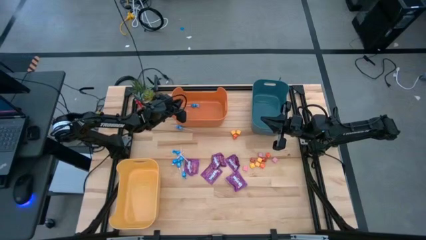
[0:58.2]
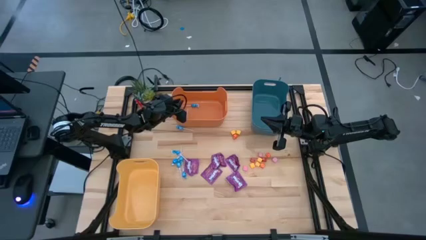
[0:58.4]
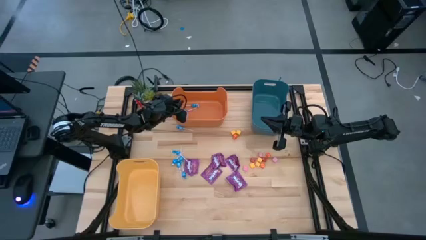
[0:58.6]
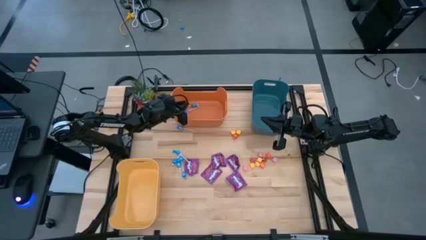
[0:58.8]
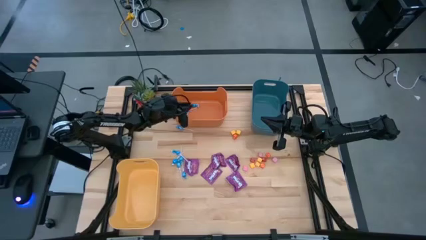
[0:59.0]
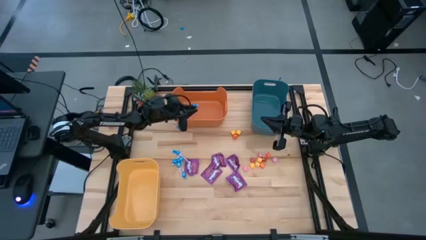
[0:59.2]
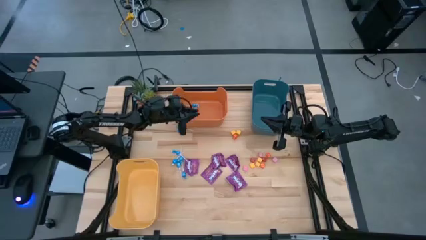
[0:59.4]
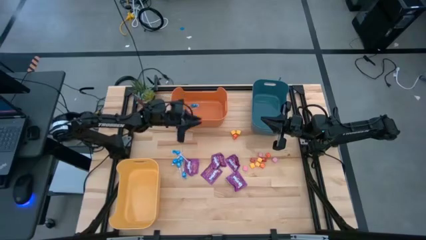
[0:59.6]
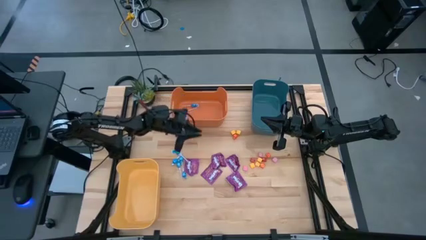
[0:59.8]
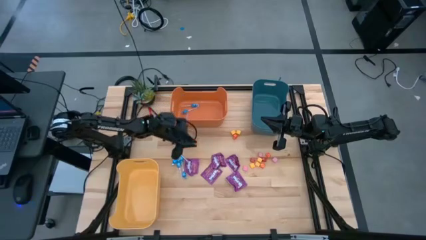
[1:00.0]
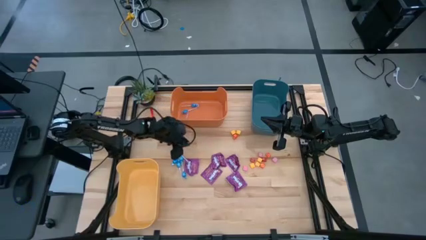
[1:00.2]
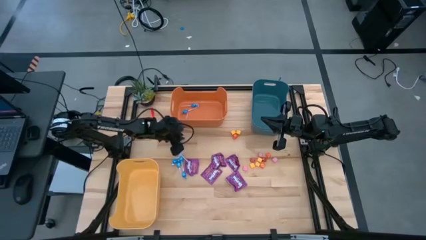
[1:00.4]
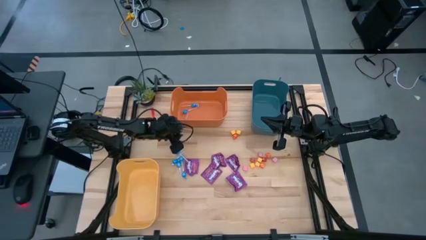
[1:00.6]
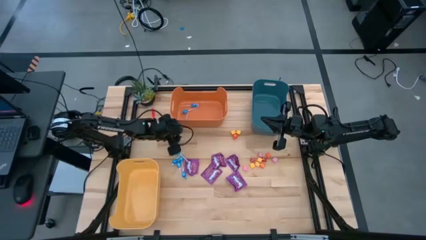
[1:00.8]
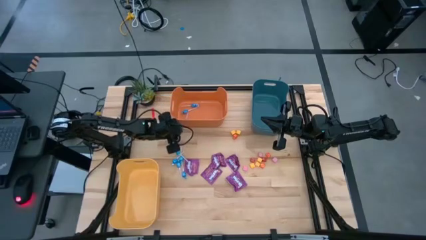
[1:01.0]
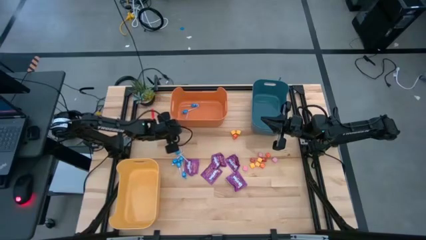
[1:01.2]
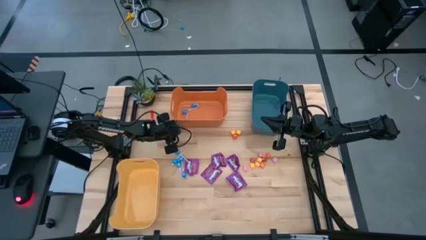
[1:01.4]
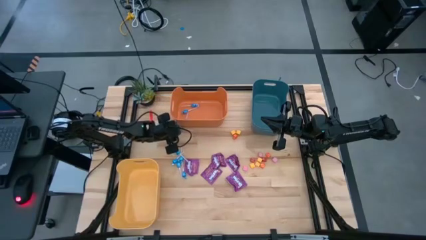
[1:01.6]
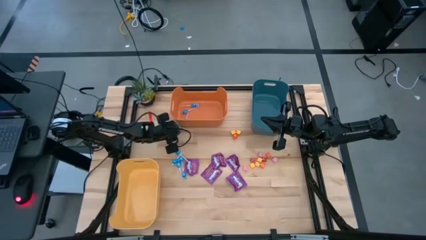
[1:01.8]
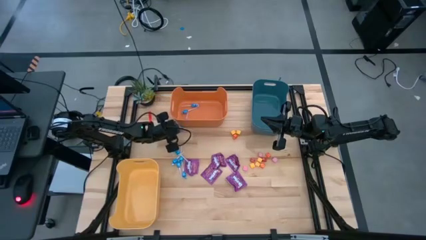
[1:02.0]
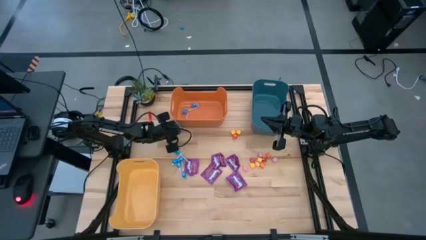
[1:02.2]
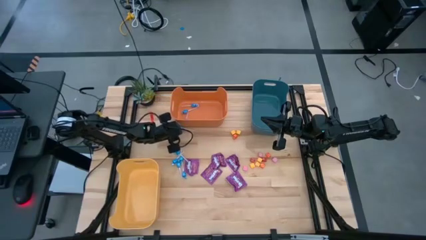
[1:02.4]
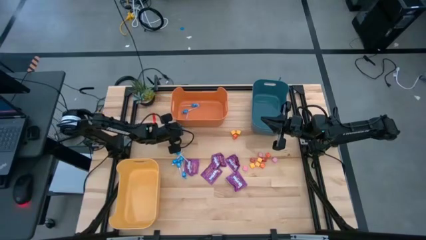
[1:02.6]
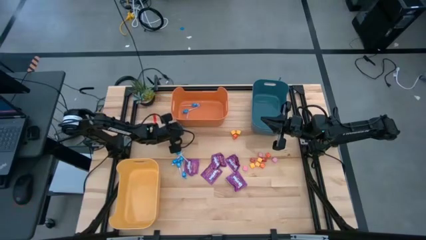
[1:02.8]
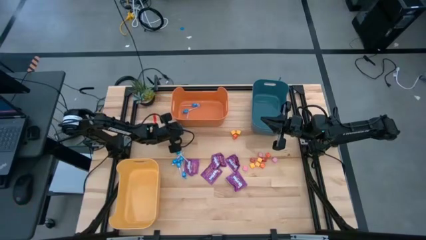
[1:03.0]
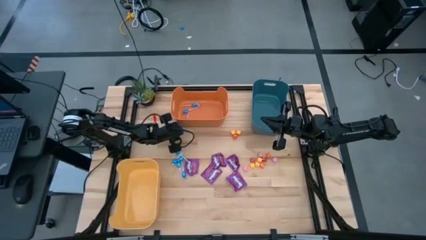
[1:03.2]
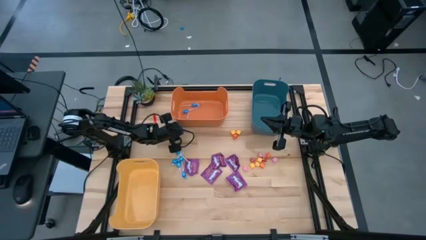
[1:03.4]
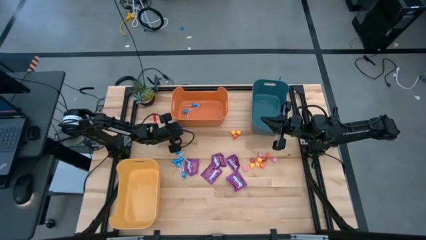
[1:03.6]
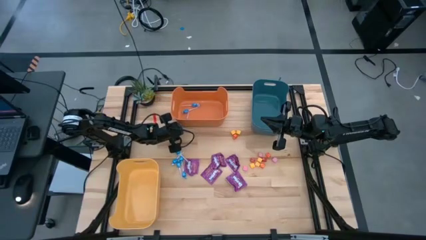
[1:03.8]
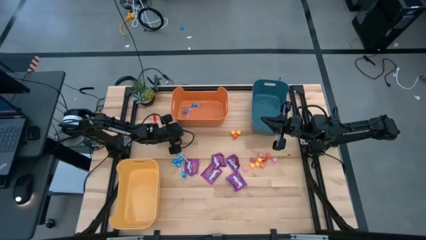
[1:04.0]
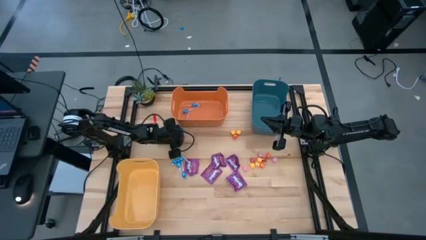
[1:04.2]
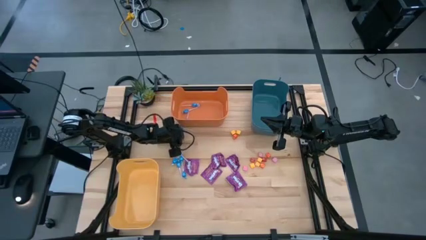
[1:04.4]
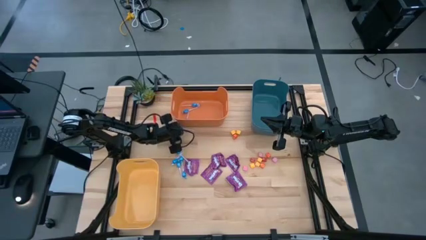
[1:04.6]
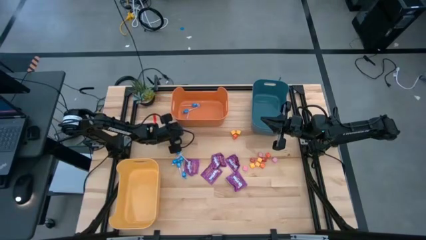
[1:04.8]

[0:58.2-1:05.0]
Task: Sort candy
Put the blue candy into the orange bin

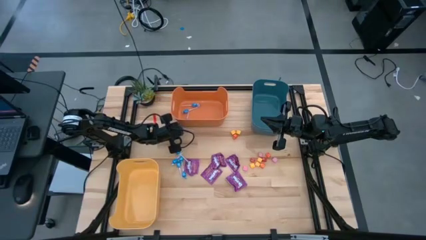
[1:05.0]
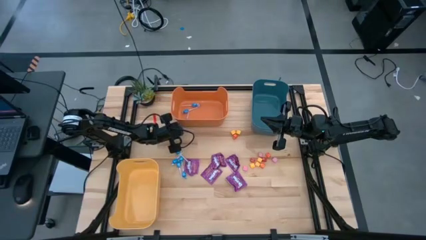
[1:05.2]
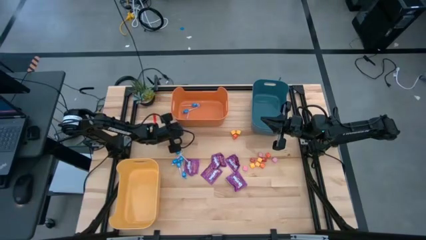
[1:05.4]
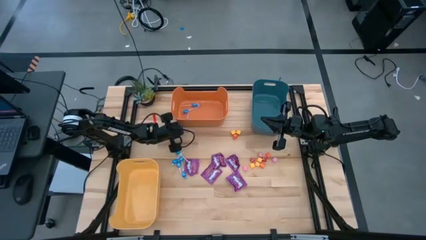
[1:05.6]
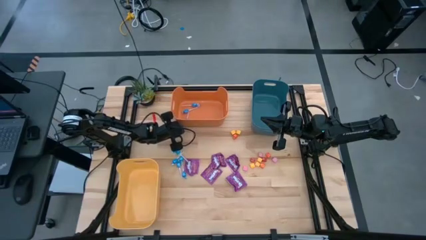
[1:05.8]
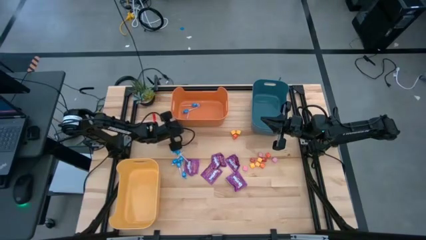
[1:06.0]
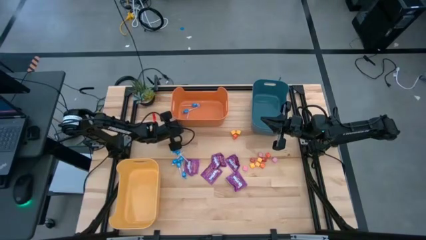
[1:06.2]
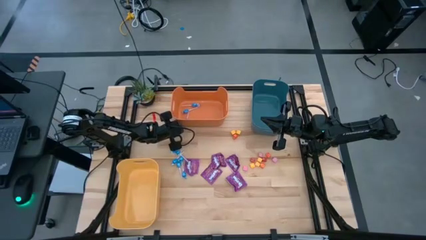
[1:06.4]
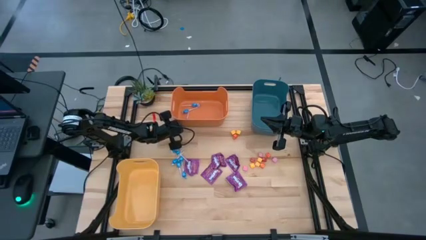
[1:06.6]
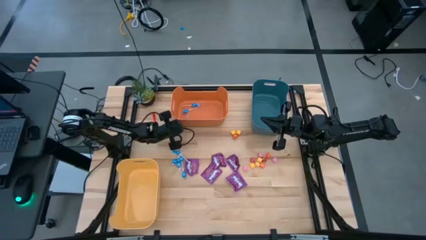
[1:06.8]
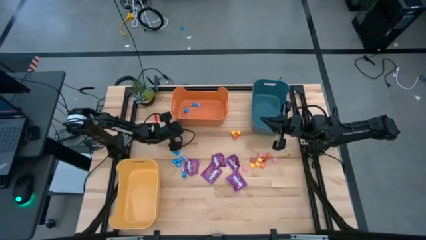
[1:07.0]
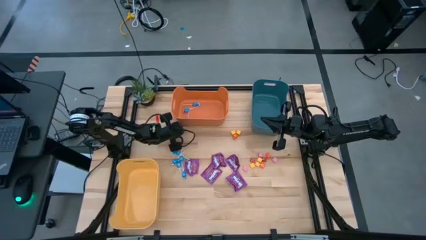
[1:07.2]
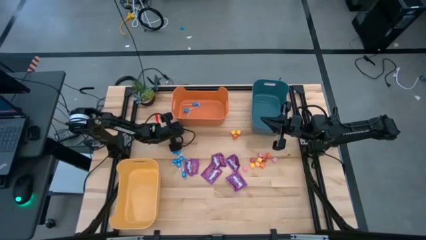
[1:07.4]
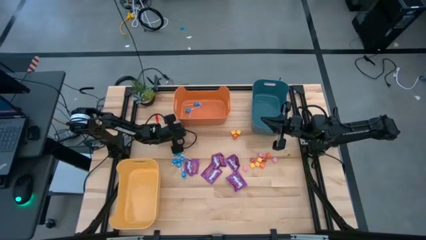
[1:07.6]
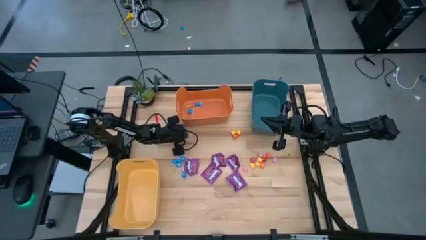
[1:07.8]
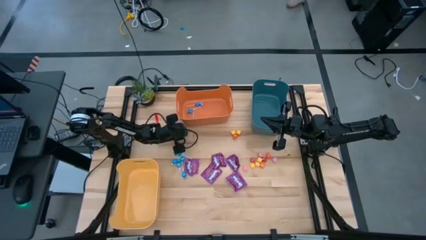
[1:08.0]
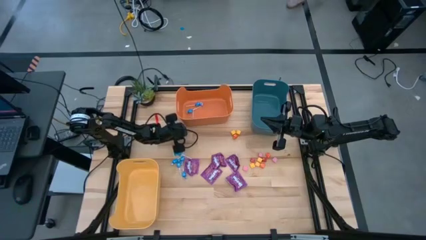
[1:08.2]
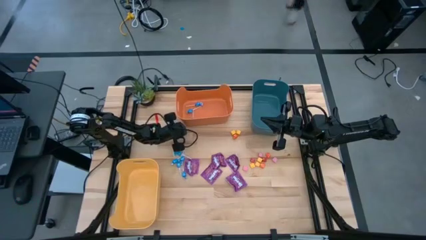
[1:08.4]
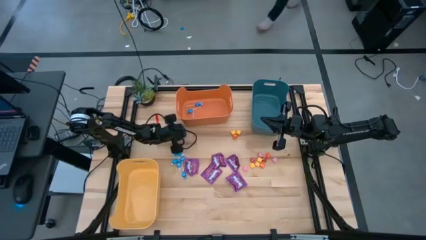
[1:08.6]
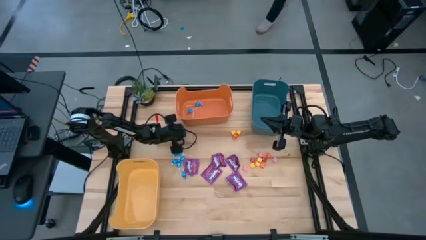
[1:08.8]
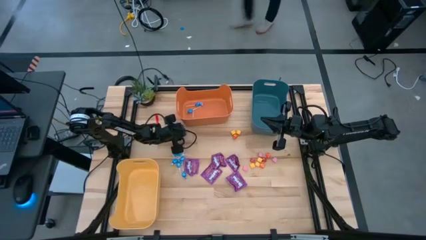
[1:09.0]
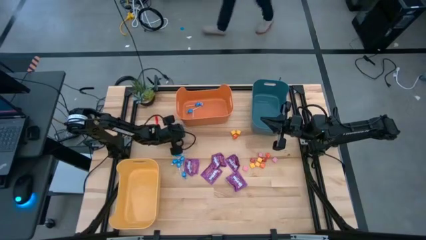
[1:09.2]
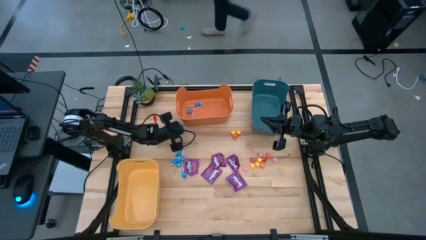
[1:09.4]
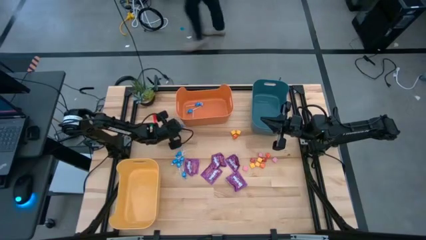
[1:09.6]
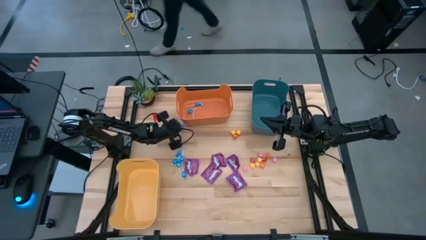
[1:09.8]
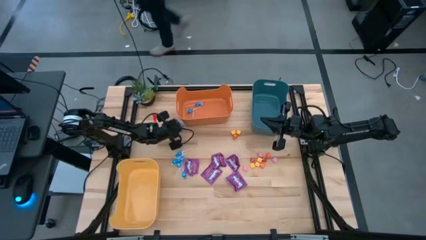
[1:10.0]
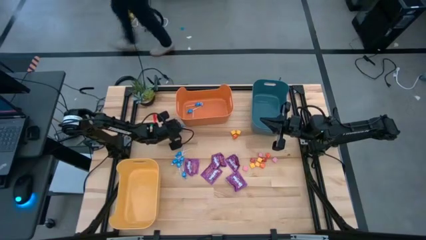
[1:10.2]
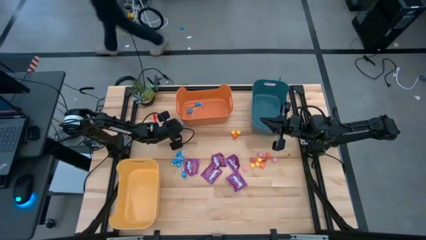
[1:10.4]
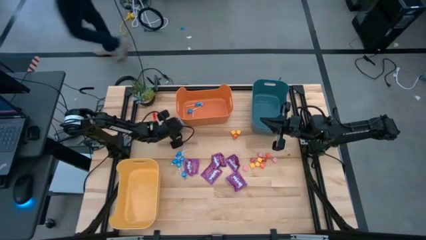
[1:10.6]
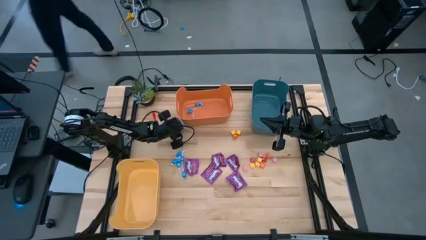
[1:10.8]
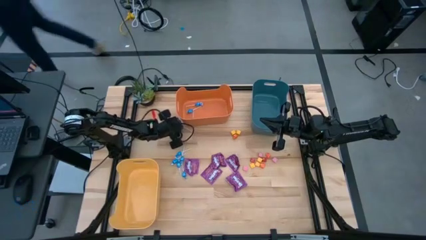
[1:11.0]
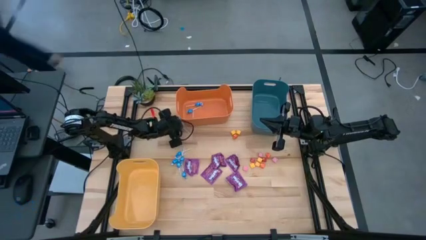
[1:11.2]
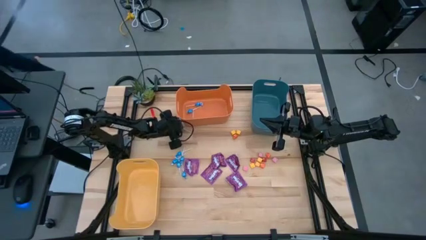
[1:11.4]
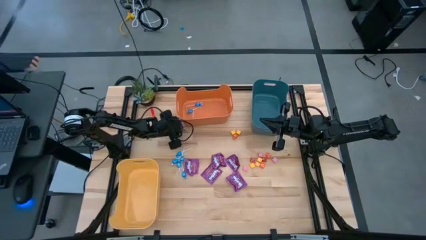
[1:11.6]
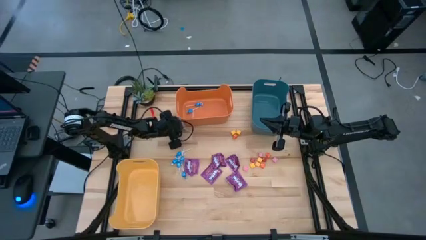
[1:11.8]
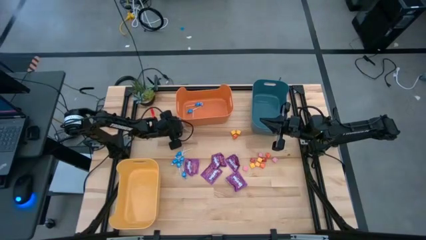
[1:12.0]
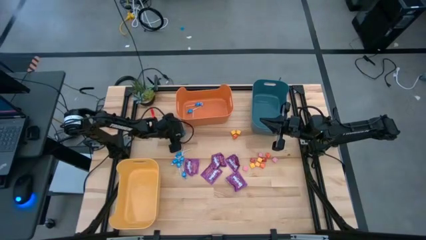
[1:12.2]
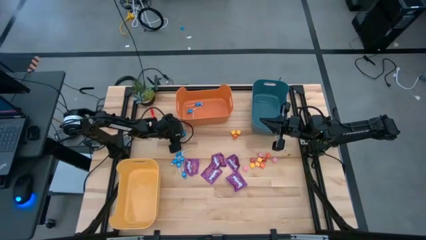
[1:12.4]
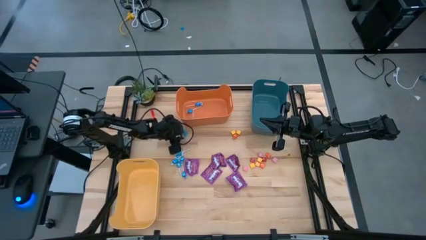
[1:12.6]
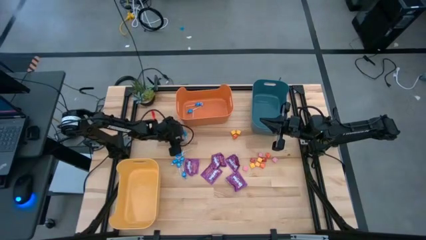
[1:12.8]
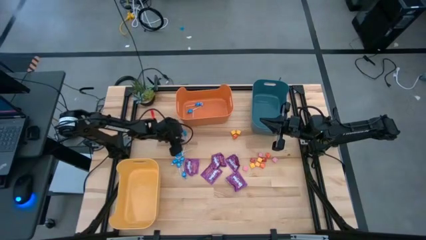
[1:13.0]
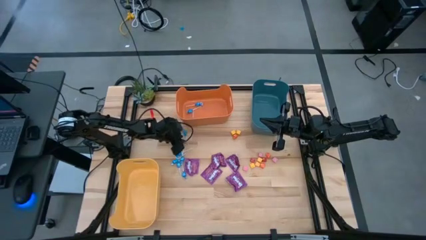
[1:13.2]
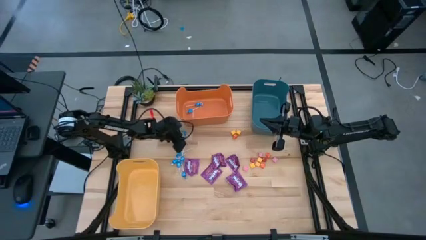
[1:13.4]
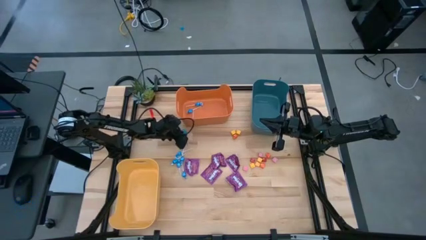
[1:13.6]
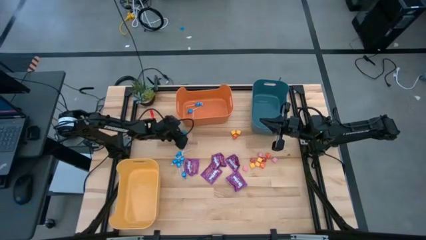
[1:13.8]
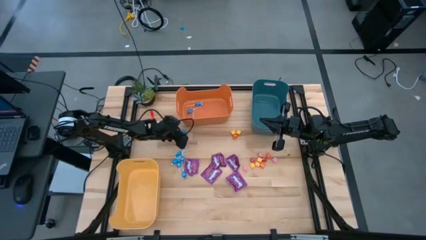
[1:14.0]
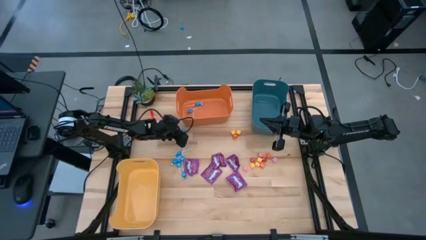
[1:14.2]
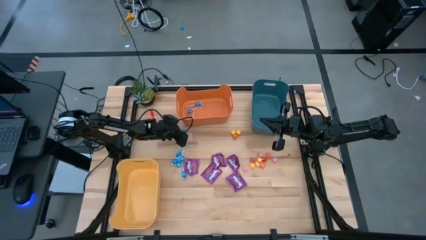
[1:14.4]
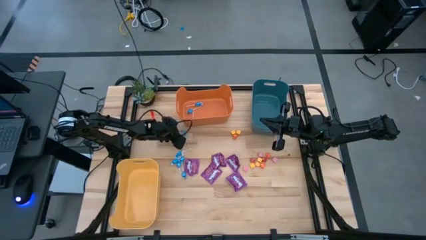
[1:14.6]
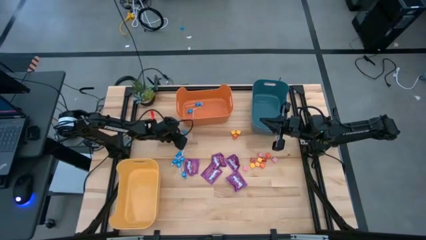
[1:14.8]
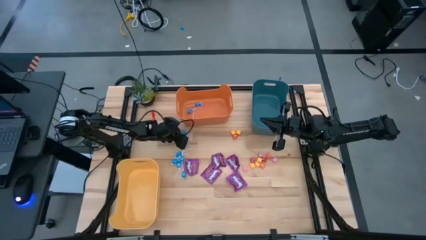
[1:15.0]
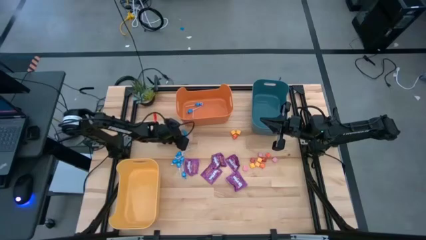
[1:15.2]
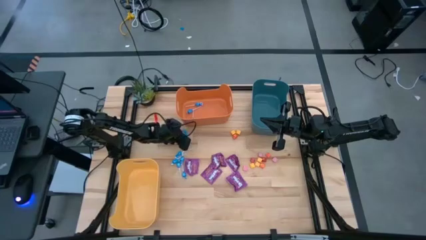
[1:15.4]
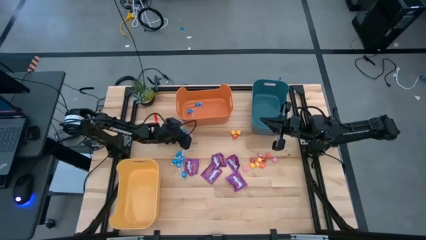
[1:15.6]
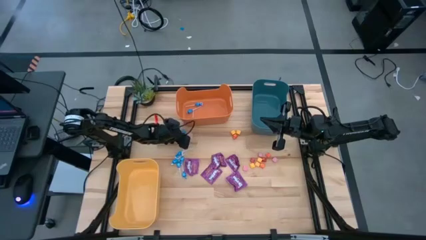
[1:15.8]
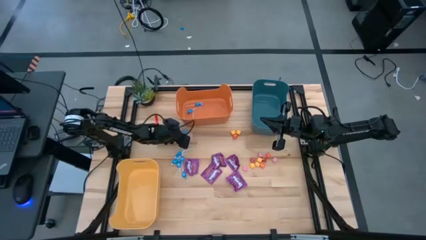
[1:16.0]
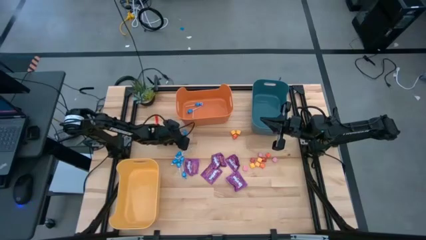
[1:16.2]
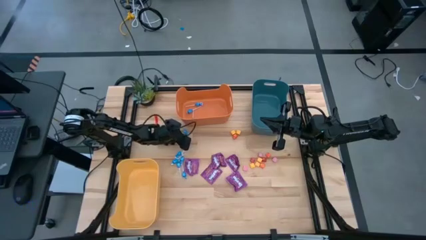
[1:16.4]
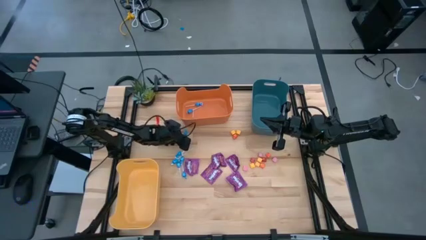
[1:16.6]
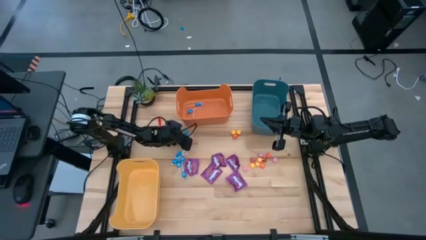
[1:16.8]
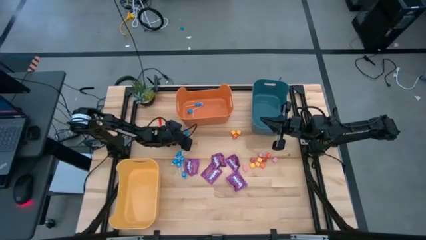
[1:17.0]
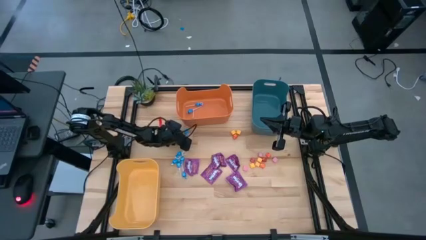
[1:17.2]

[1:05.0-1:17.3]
Put the blue candy into the orange bin
